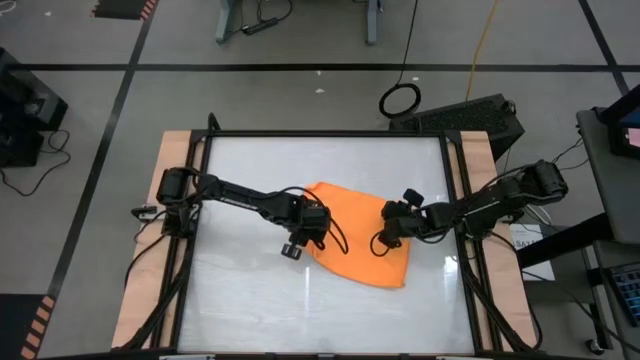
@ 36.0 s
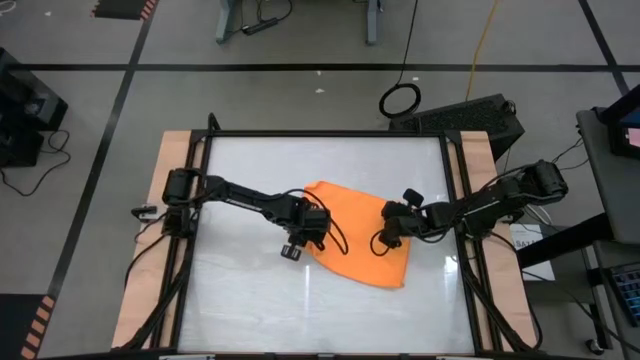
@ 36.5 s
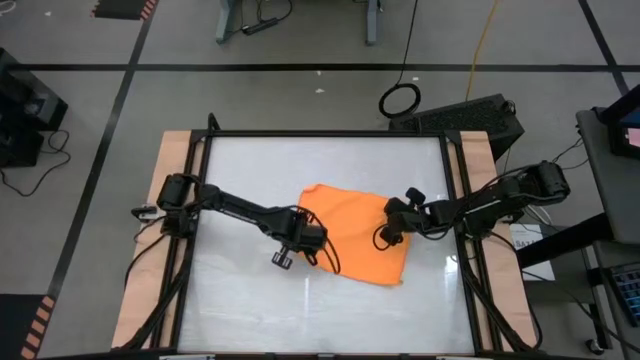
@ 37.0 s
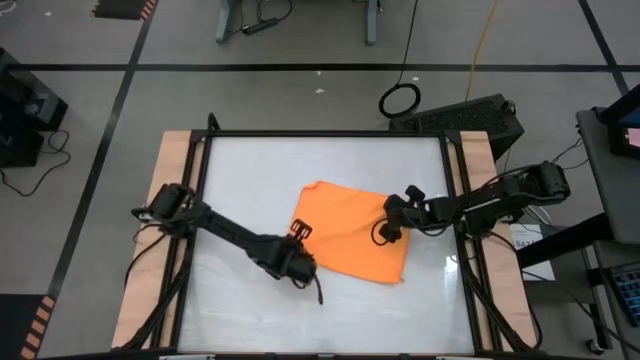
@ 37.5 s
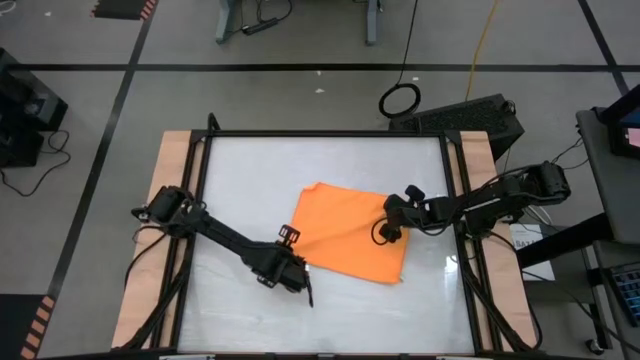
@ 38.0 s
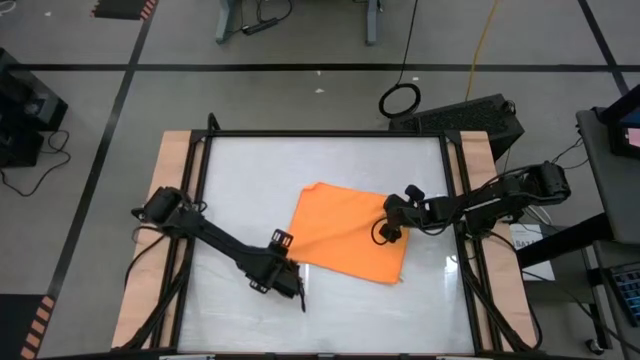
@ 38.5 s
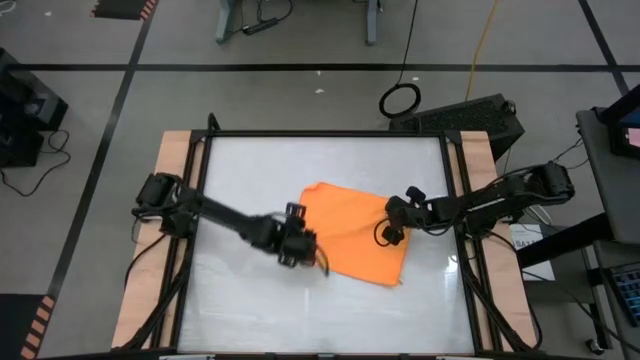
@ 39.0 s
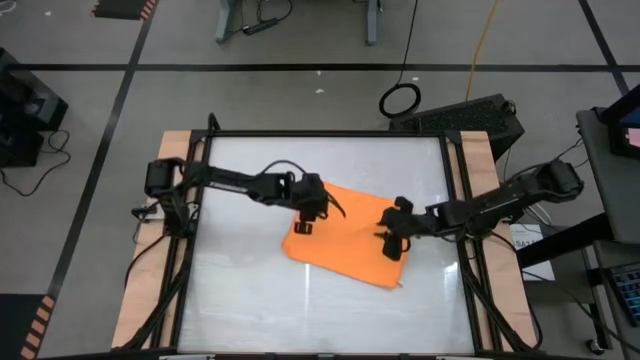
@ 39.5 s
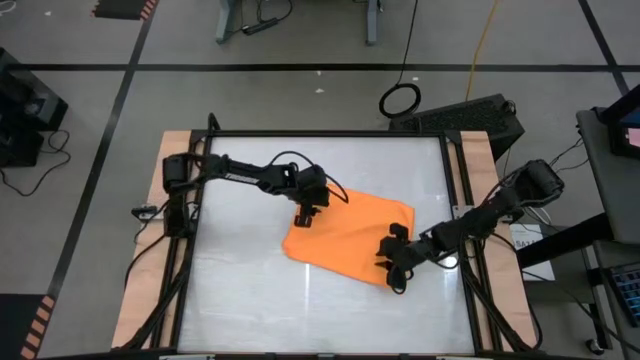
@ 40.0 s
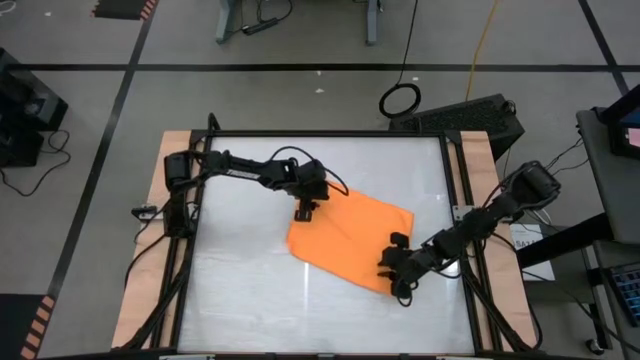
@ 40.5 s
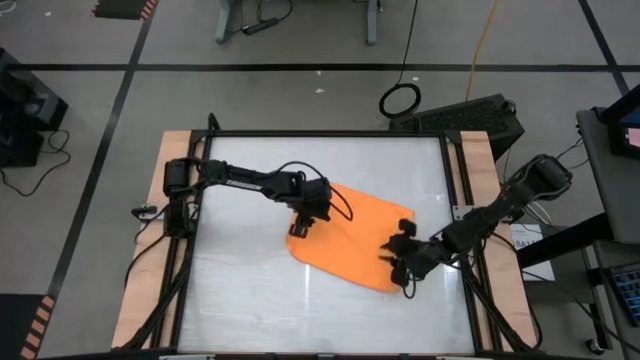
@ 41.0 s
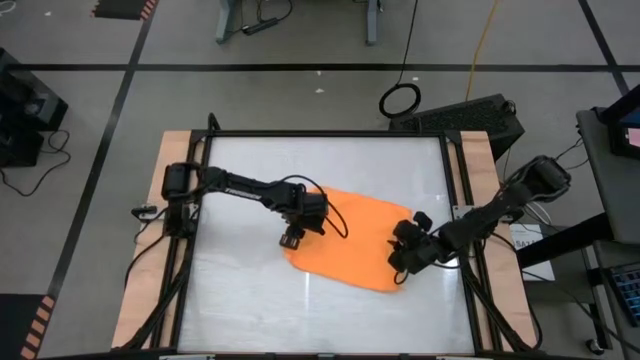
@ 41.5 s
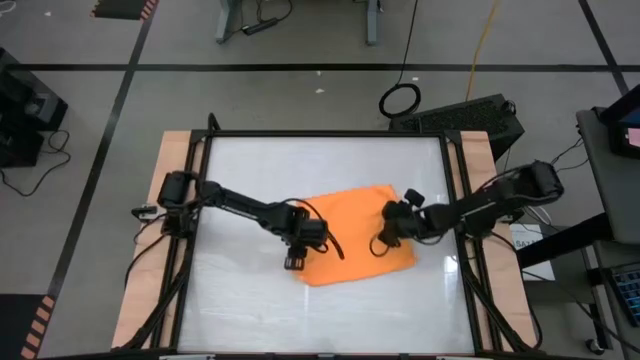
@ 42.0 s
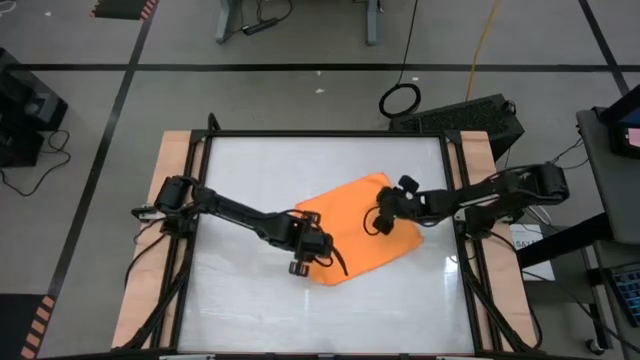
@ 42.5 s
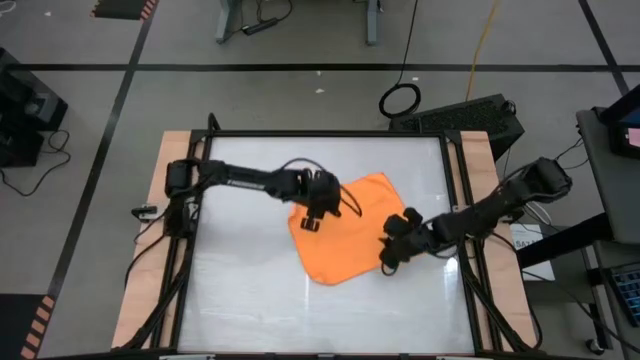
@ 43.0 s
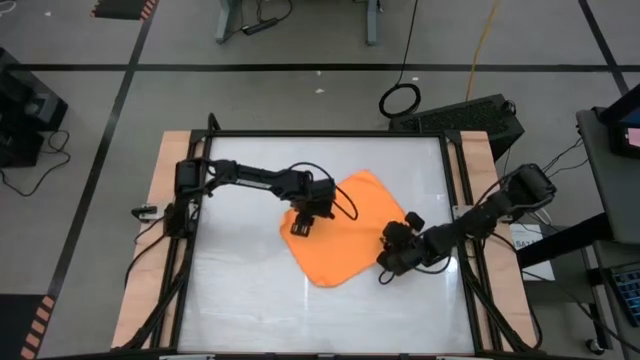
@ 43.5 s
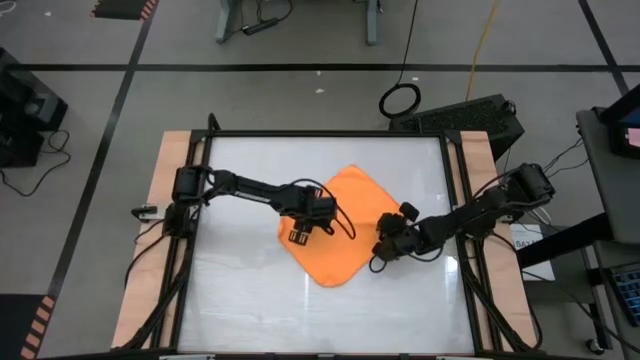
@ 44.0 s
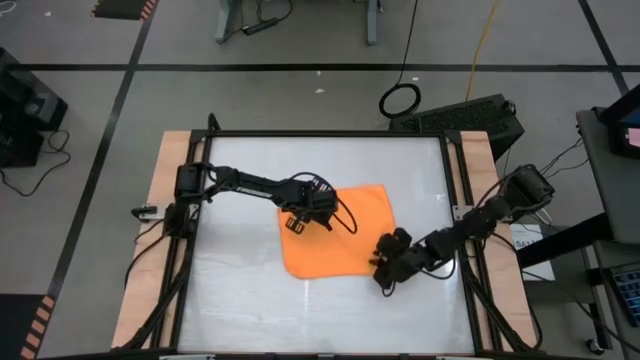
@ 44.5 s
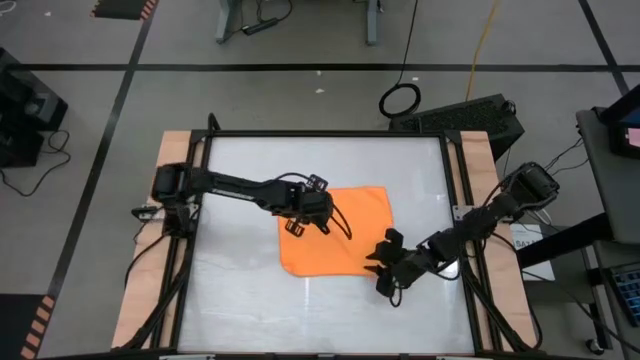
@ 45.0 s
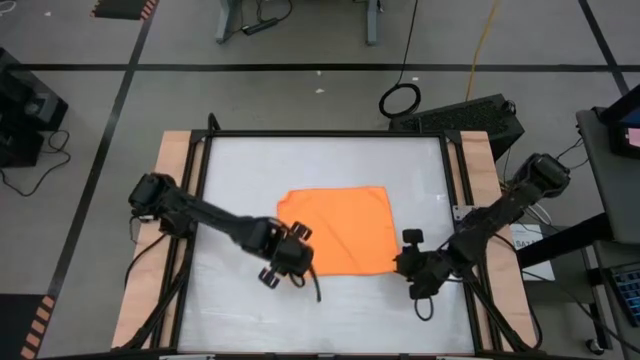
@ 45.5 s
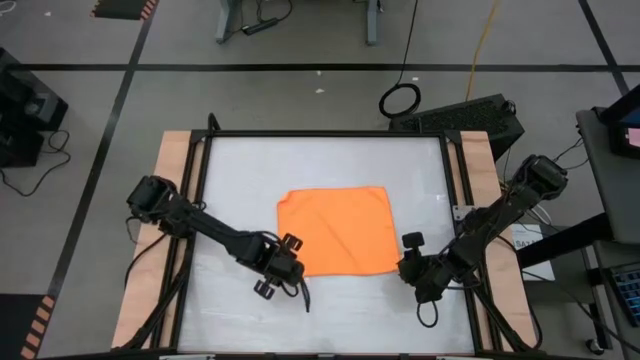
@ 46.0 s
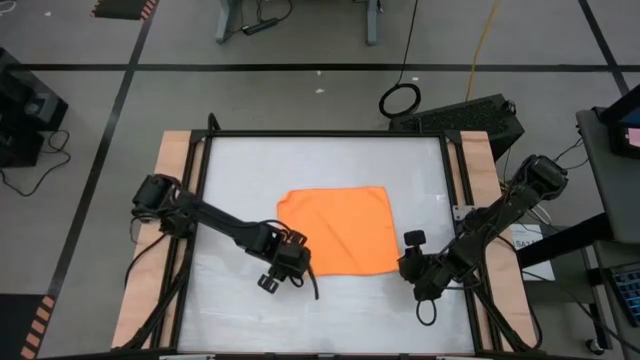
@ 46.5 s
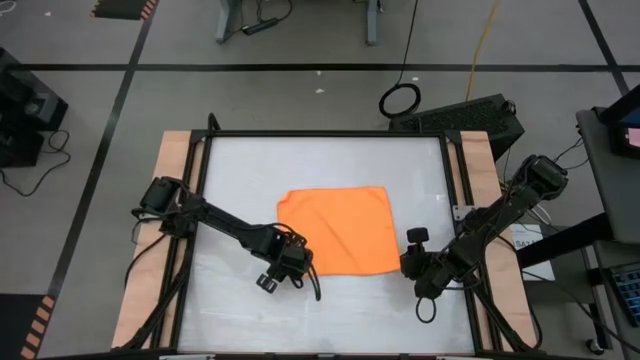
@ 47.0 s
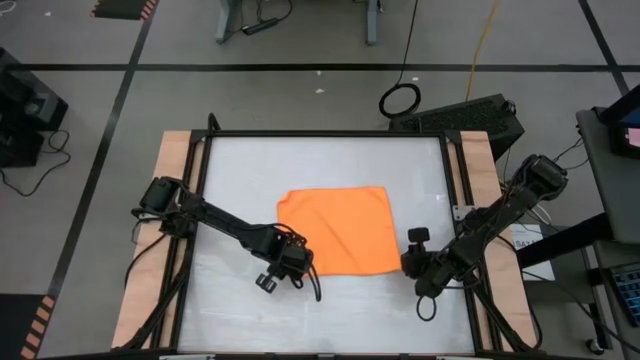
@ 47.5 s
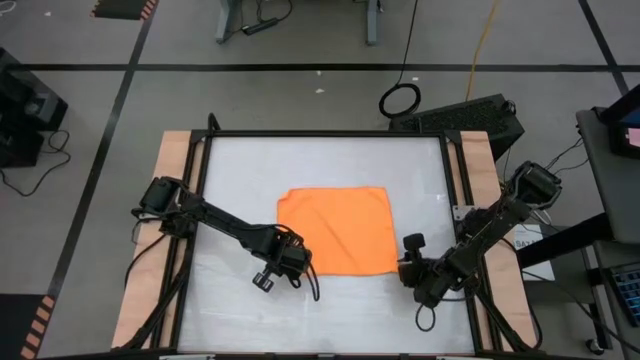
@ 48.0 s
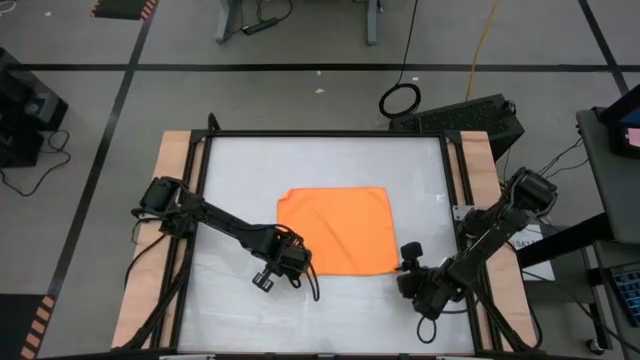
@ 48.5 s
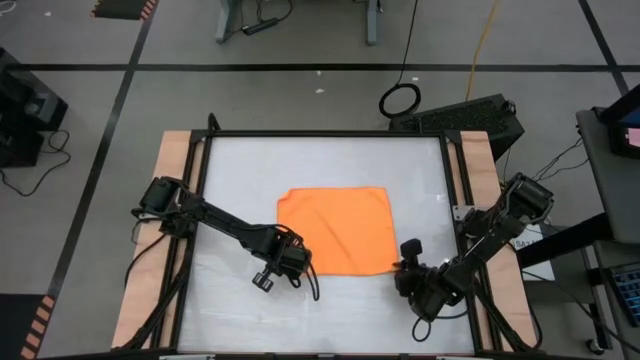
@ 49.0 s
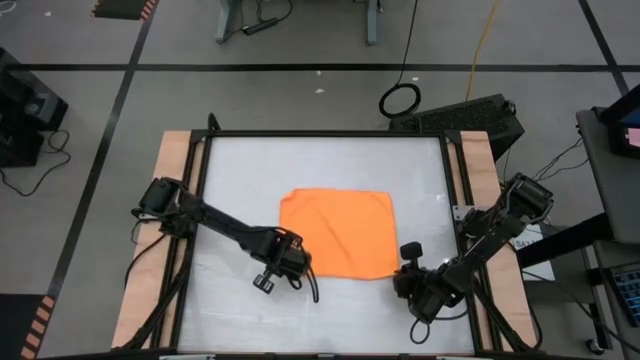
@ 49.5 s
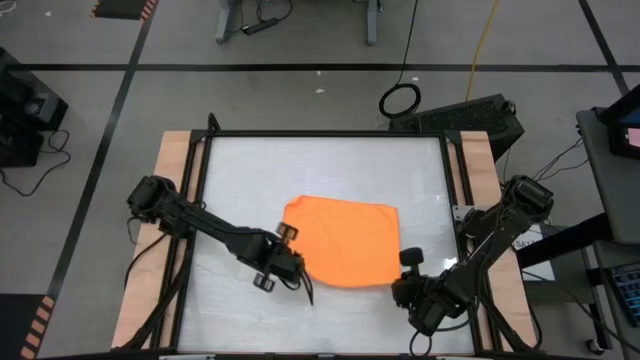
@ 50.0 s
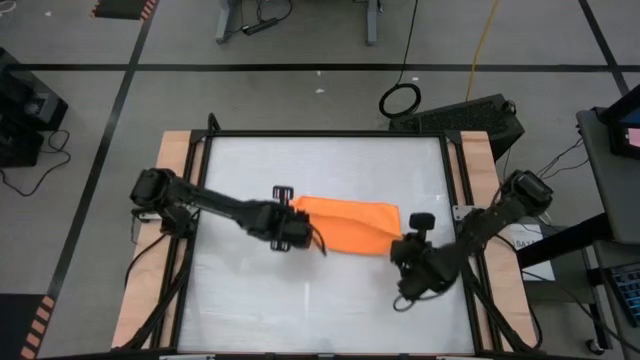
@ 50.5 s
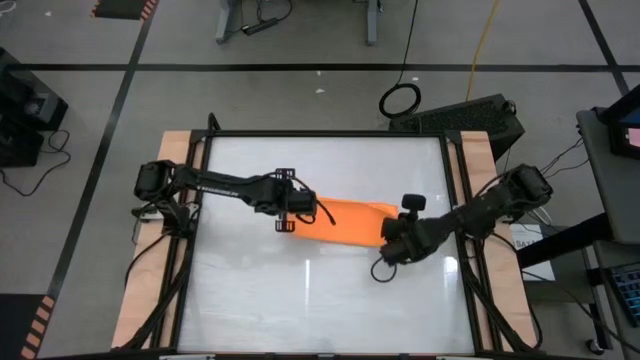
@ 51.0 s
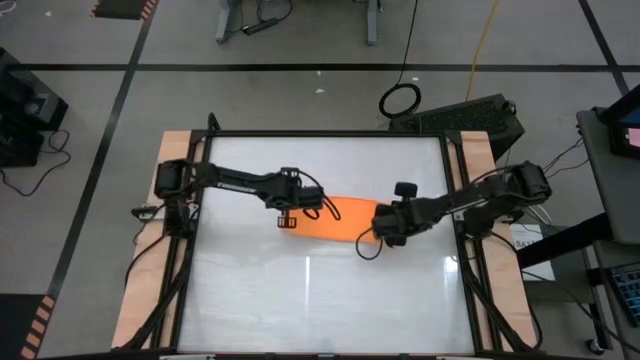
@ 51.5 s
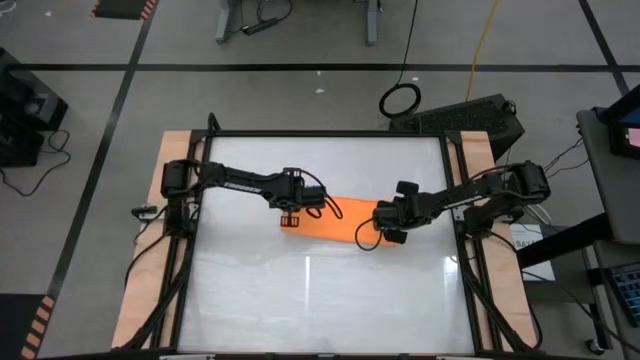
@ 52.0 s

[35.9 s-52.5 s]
Task: Roll towel
Fold the towel

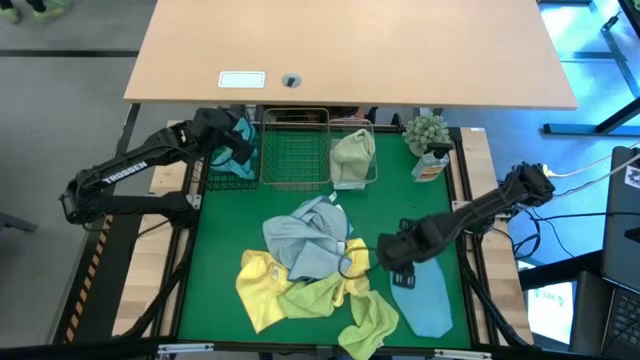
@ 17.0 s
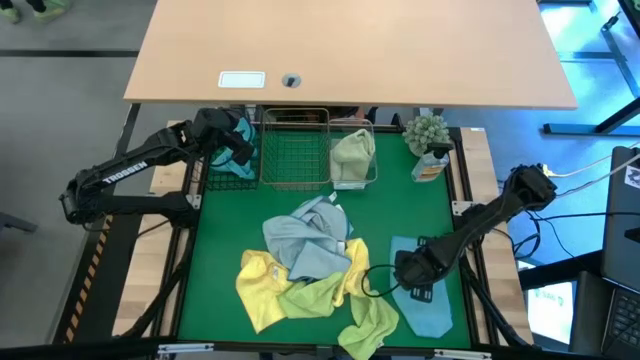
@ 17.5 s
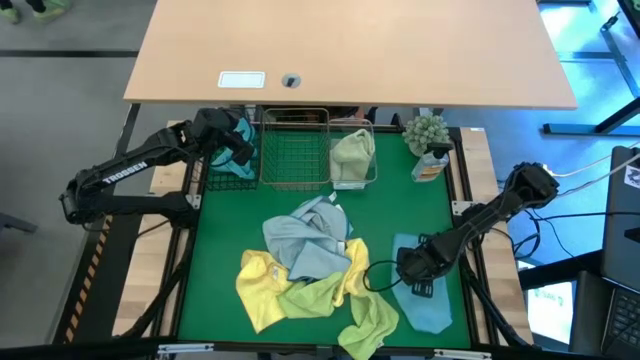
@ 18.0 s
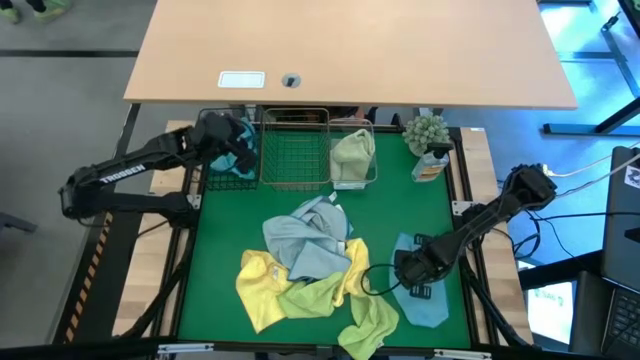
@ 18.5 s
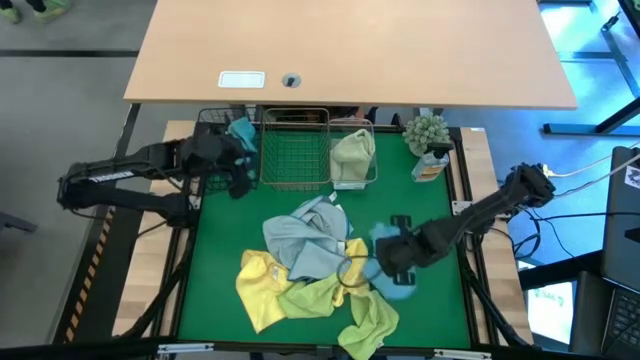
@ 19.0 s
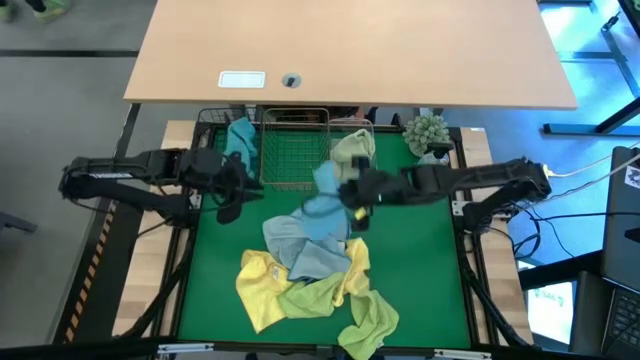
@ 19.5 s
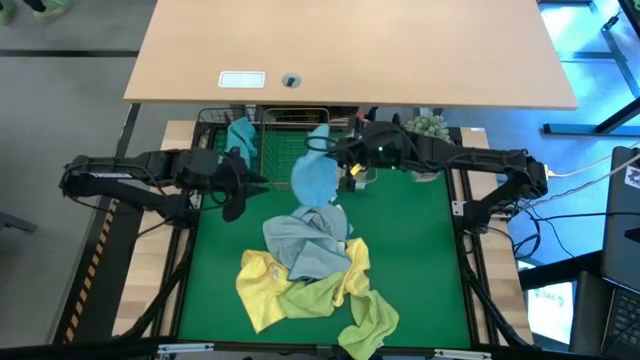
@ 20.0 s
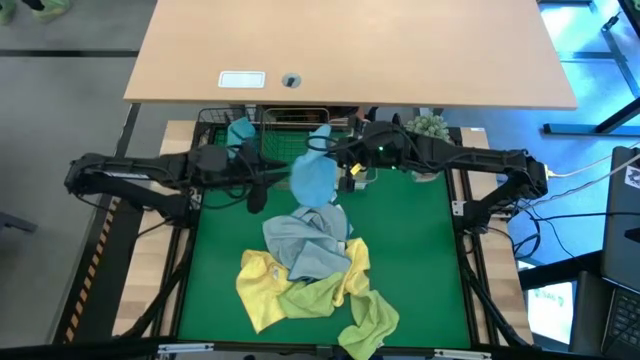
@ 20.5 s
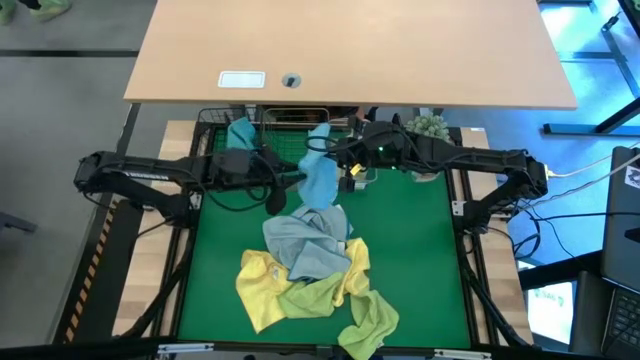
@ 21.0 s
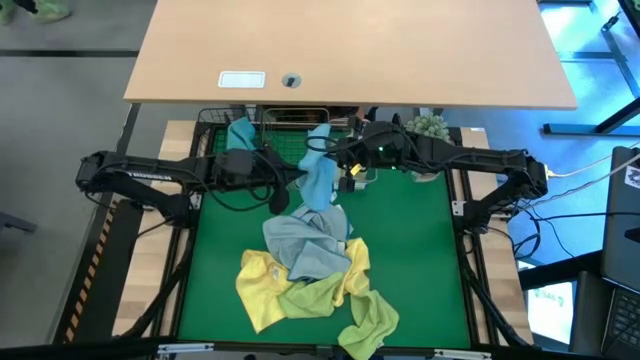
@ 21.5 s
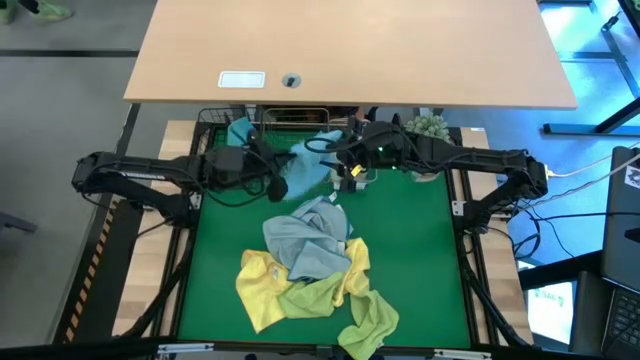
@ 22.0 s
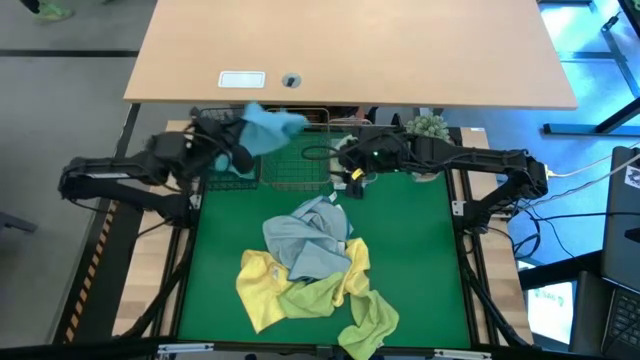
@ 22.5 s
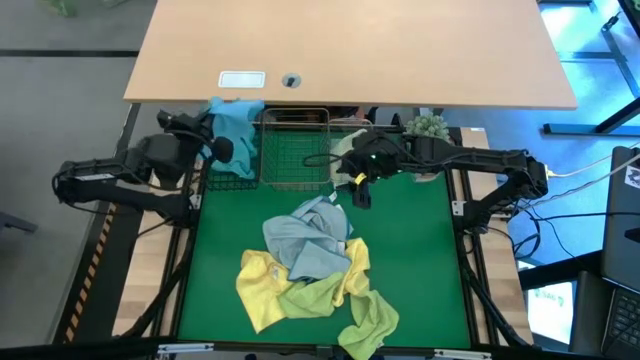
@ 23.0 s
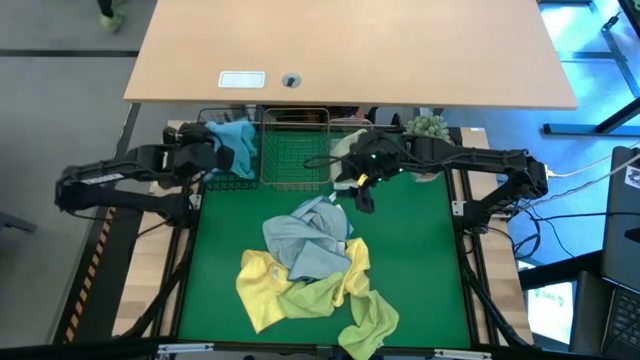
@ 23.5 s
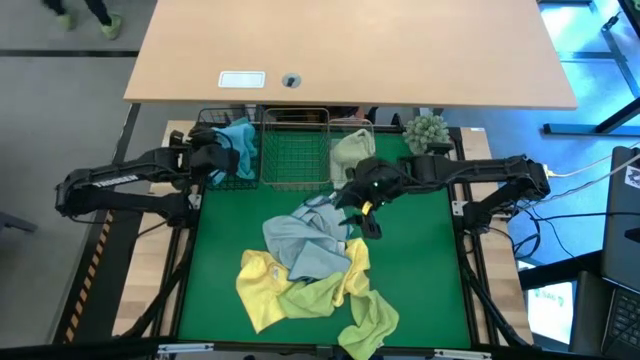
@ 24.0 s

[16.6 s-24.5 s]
Task: Sort microfiber towel by color & place in baskets
Put the blue microfiber cloth into the black wire basket
